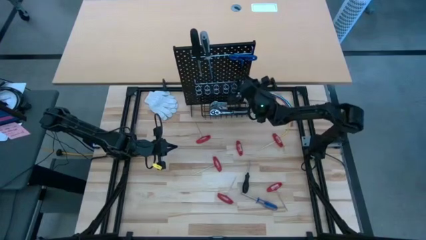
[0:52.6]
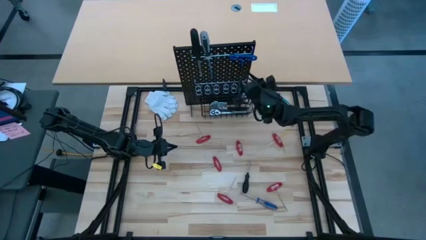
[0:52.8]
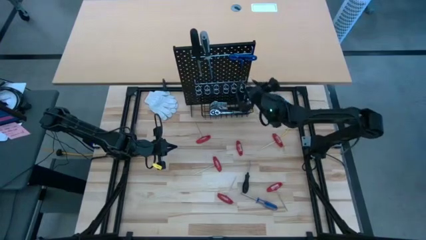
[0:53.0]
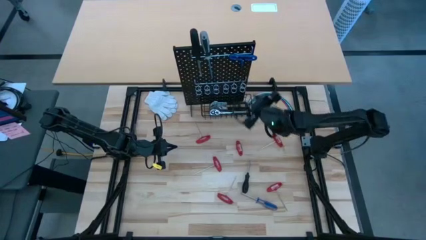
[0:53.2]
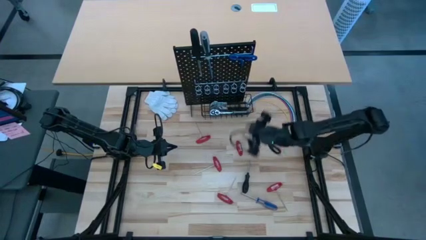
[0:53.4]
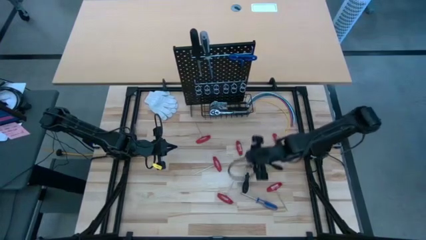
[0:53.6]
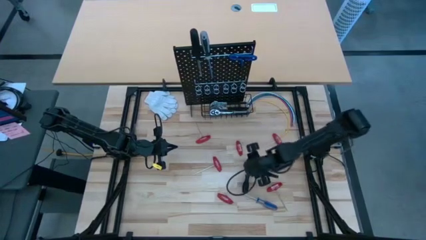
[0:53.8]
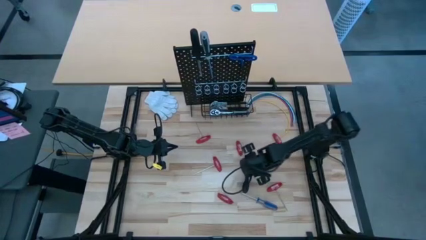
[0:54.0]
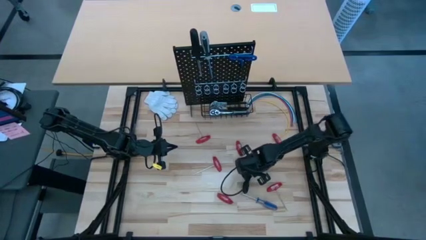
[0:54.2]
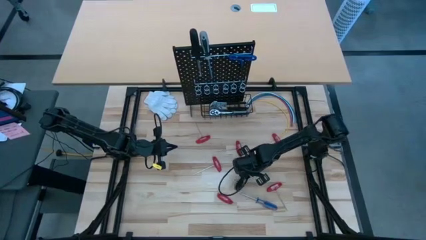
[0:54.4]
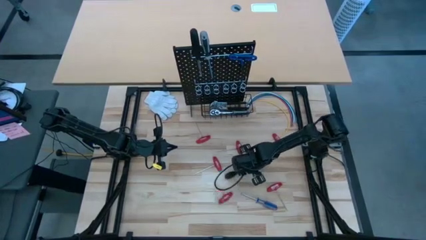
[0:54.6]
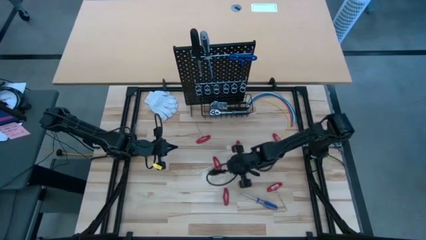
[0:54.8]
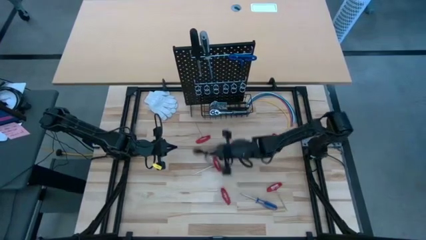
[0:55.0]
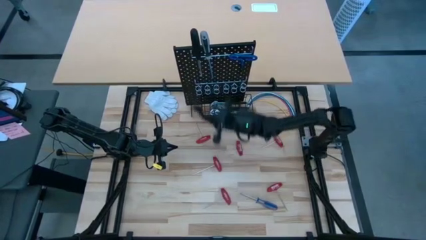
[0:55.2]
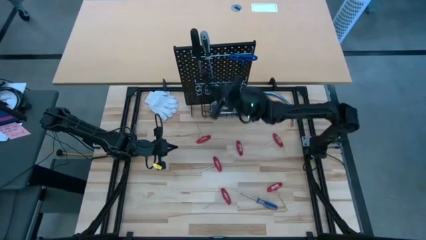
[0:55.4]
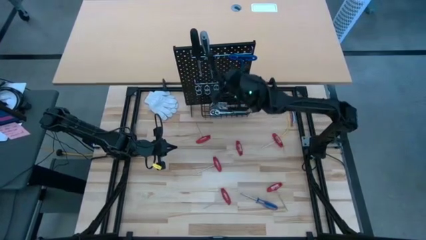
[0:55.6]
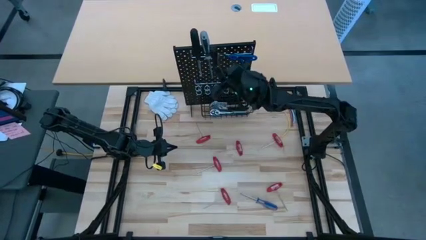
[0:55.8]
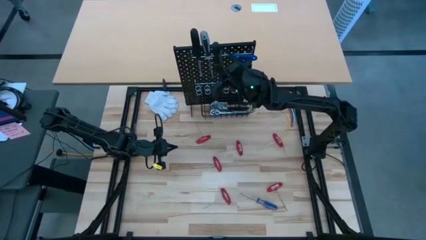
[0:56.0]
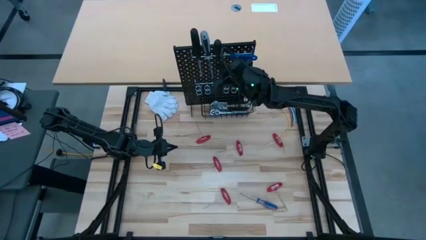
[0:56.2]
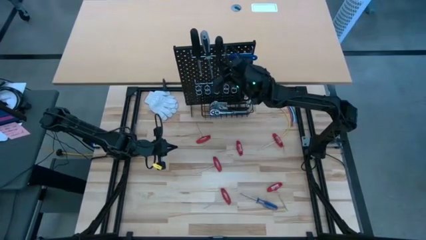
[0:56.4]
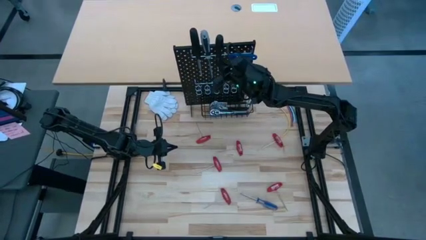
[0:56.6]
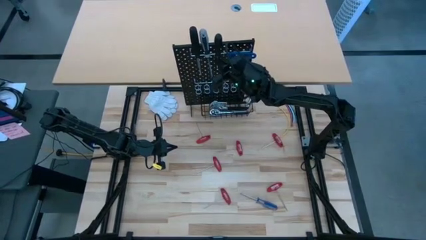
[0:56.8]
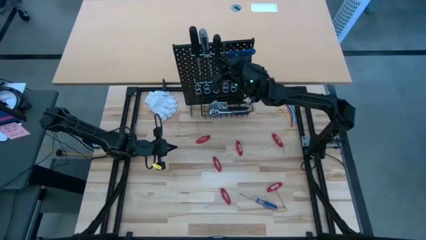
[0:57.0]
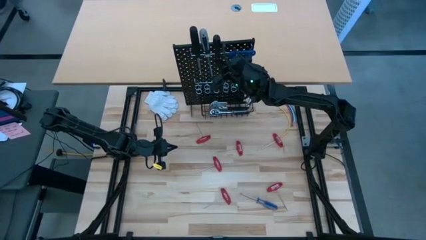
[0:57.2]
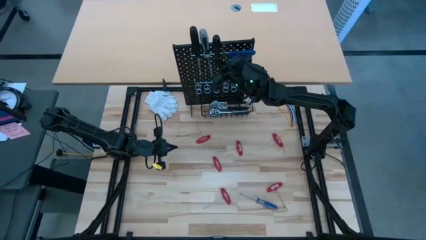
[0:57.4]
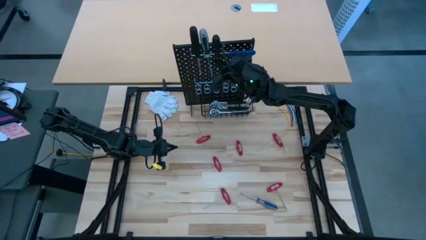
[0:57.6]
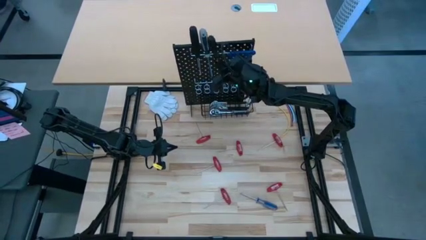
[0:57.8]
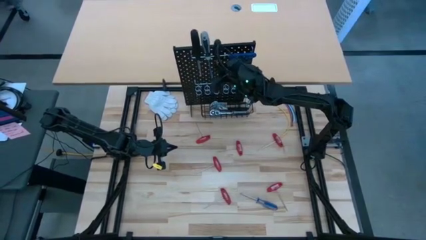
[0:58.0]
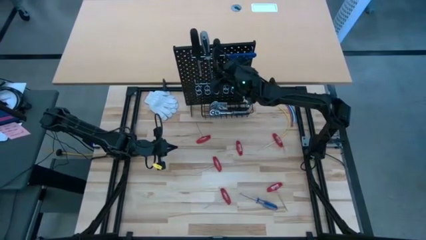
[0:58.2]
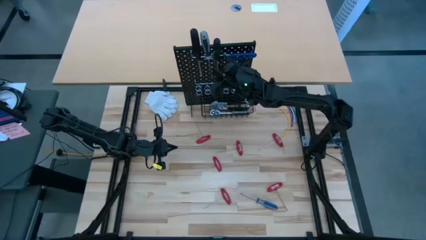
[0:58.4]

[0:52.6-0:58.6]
Task: Hang tools onto peg board
Hang the black screwdriver on the pegboard

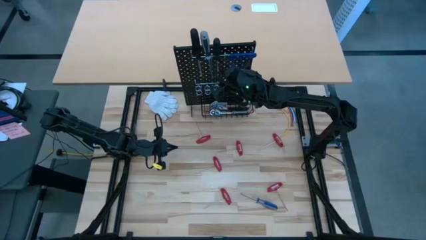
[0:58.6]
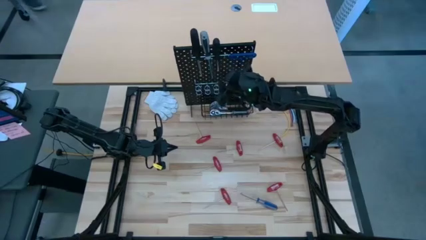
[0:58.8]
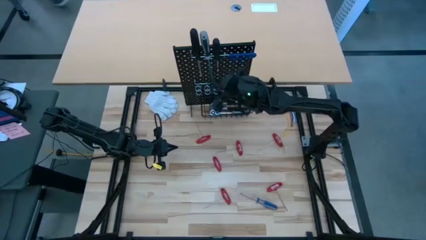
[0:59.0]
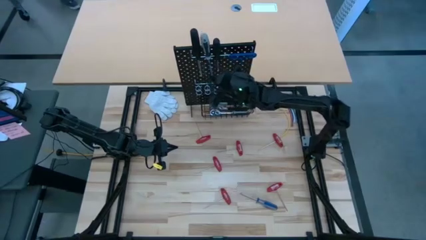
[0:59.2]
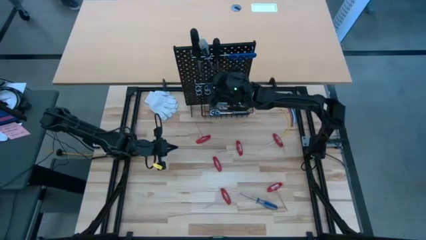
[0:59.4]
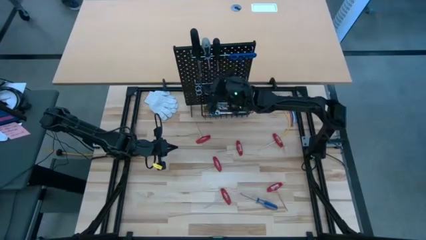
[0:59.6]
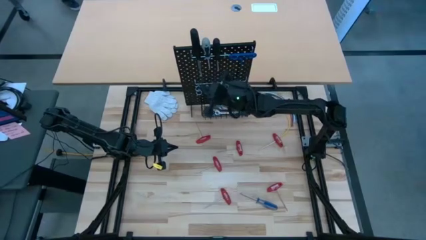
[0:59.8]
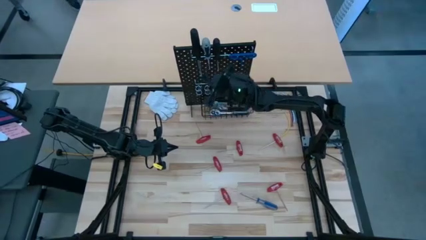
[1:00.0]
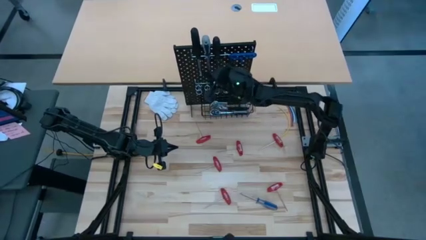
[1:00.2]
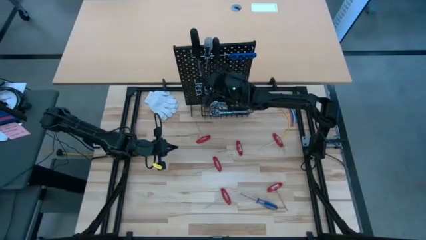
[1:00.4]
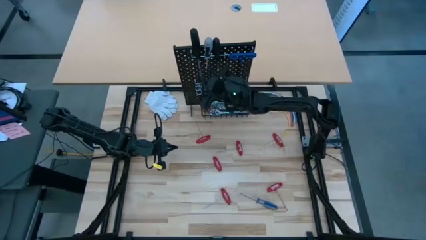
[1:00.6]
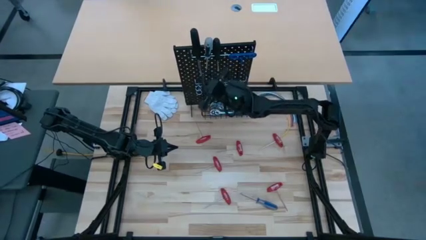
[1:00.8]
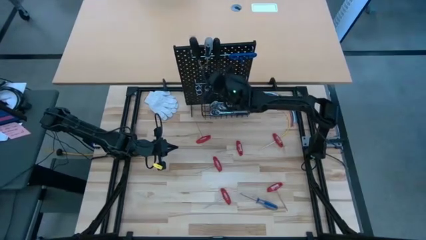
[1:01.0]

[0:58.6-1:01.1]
Adjust the screwdrivers

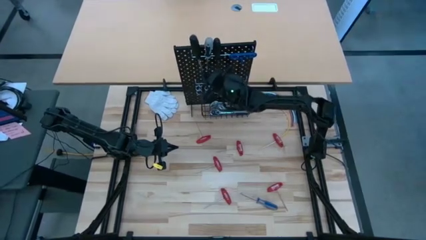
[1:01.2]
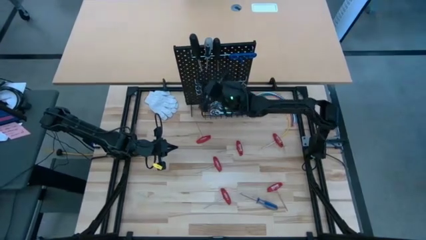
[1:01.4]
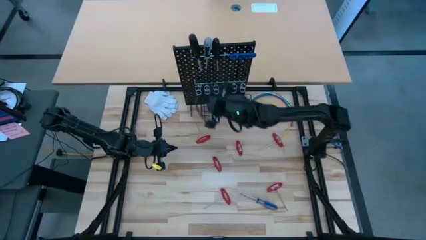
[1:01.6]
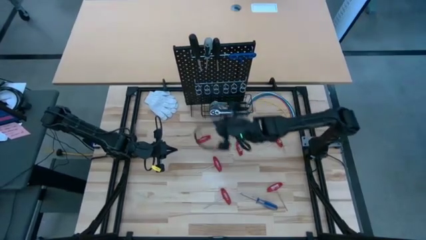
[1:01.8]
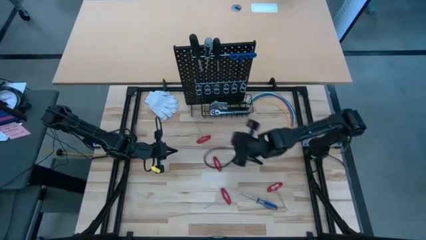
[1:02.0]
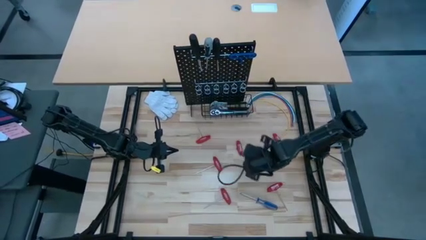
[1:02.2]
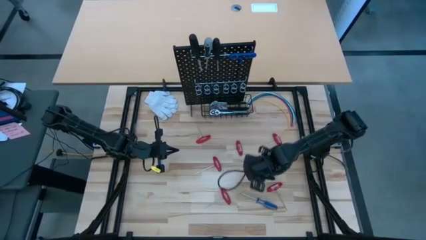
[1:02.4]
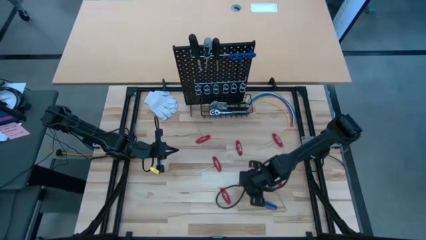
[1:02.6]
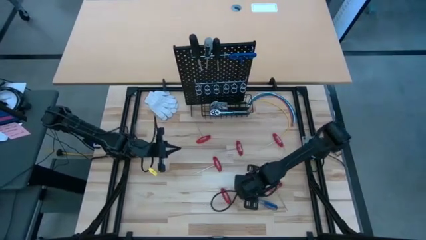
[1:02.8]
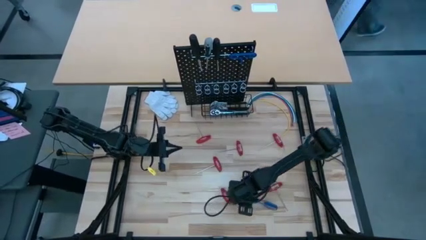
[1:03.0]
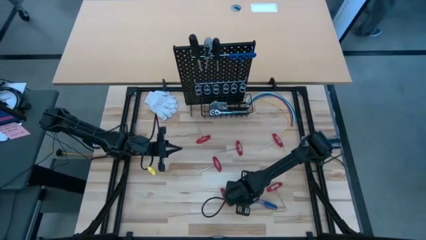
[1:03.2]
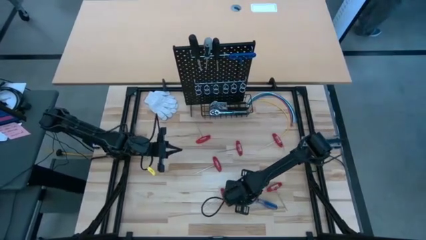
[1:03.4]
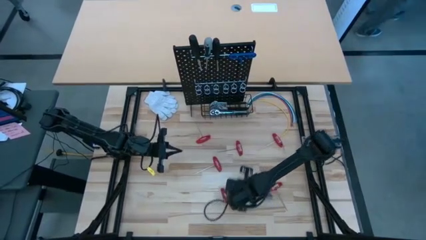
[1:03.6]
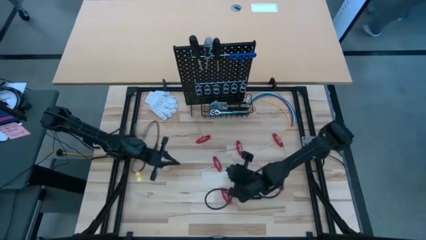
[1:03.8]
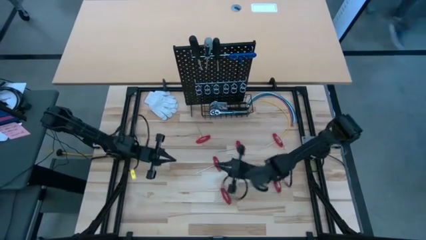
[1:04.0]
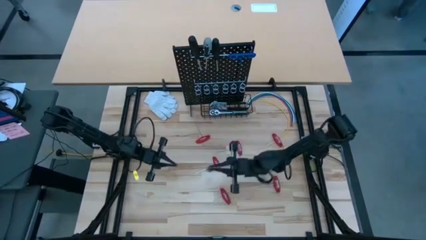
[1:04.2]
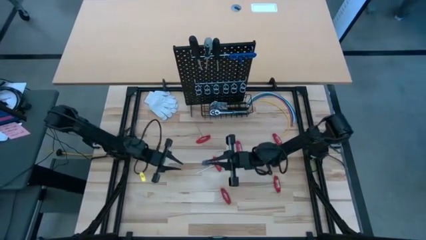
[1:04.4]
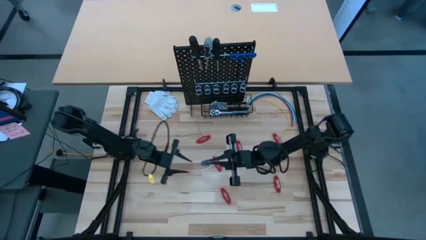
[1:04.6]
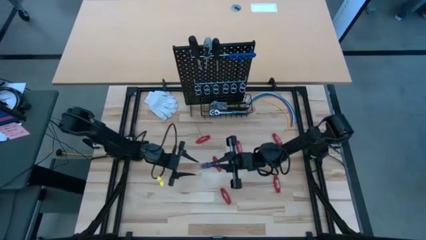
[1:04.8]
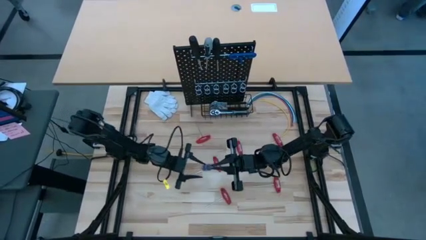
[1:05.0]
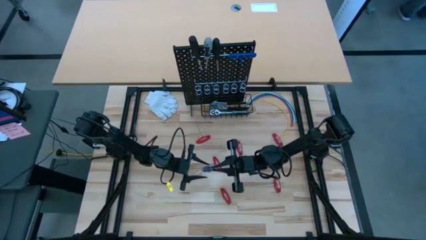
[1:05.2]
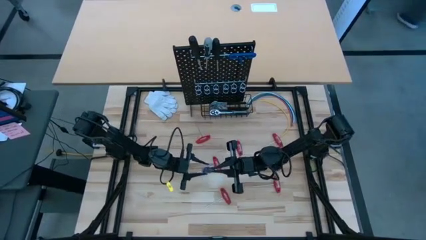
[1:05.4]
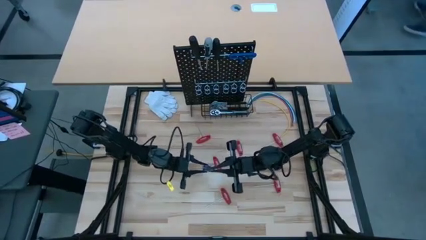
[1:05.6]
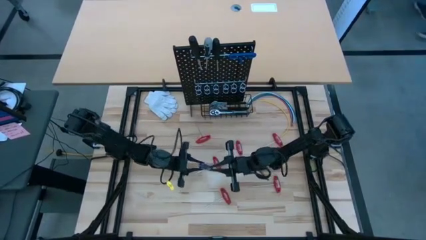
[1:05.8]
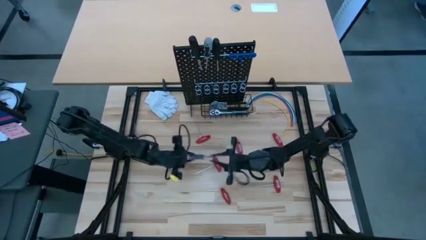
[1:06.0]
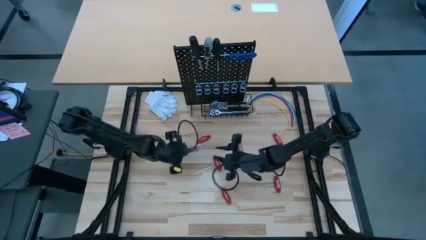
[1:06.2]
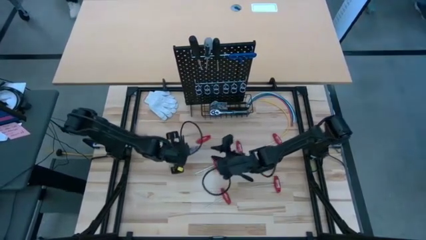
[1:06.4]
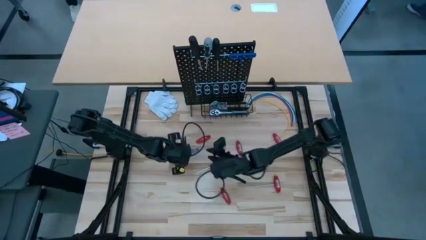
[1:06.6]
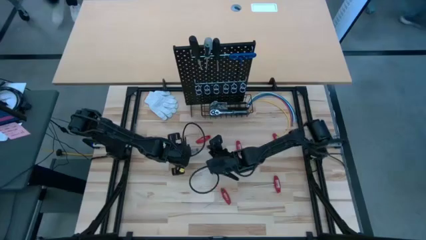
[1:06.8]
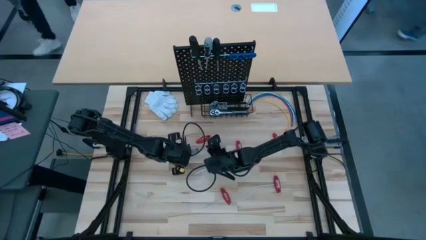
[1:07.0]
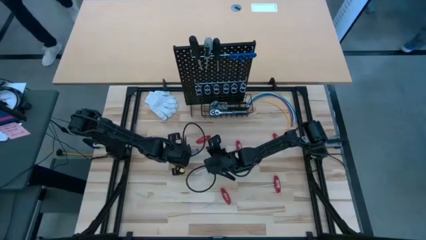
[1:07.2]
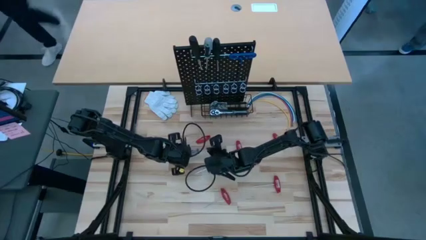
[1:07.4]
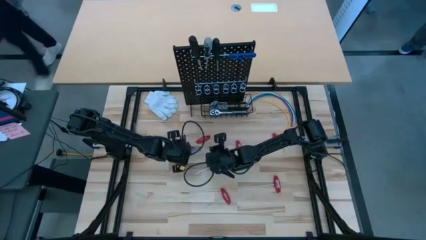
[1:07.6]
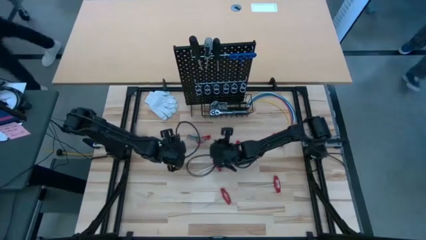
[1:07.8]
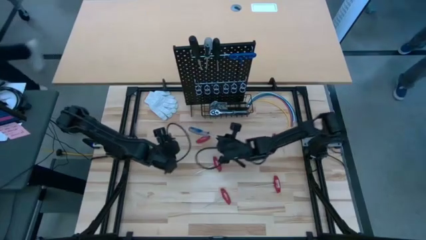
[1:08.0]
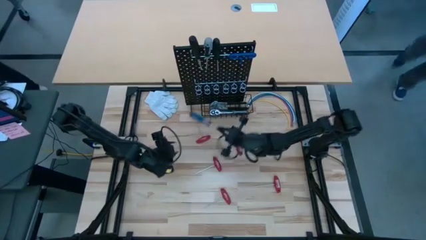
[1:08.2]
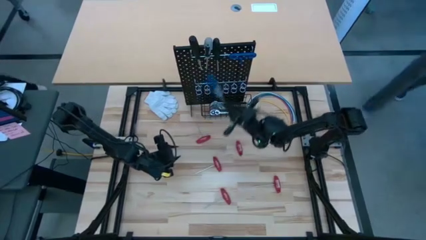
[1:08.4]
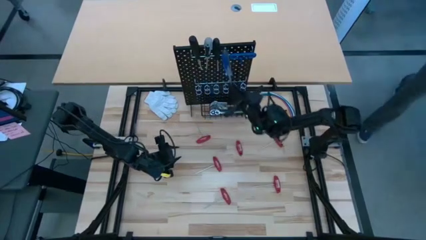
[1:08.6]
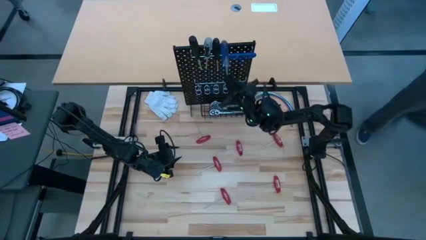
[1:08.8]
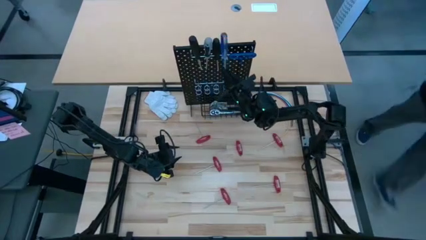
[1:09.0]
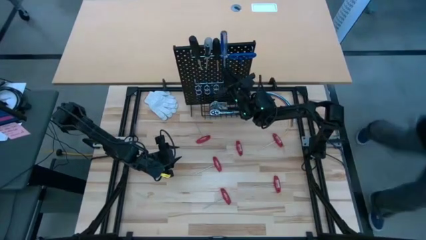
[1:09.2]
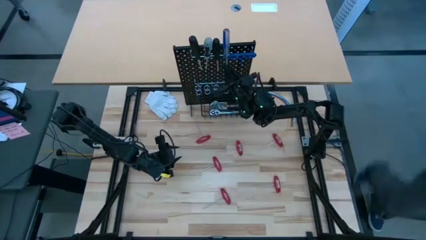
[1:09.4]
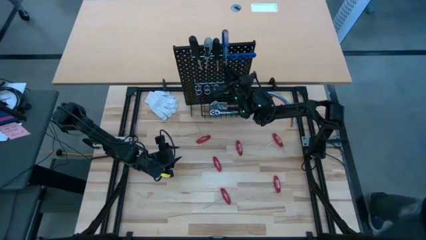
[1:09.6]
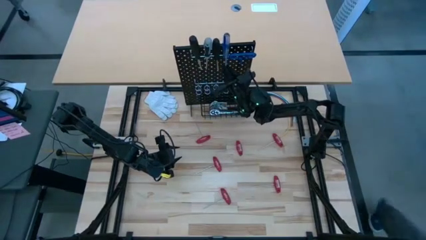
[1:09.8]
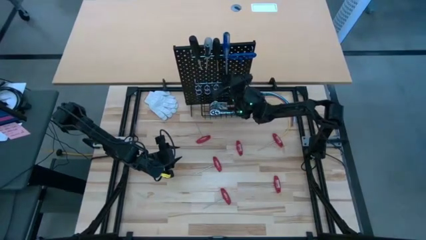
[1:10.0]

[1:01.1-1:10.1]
Hang the blue transparent screwdriver on the pegboard
